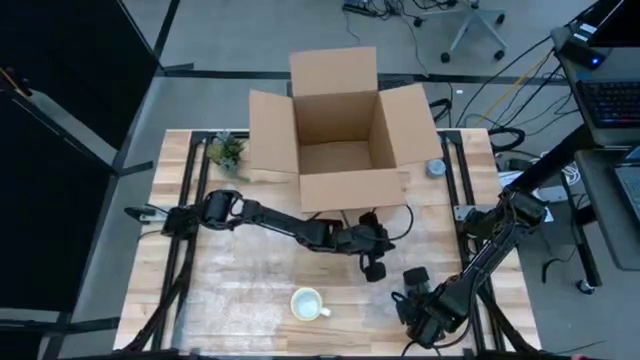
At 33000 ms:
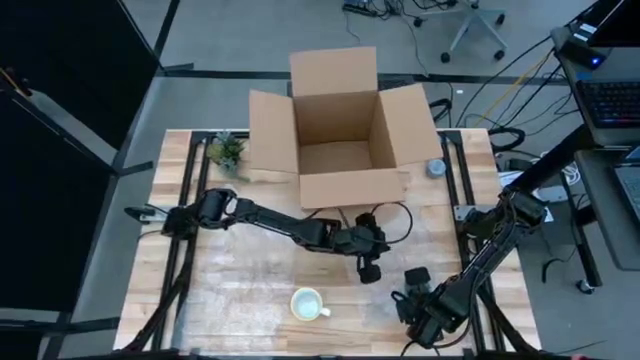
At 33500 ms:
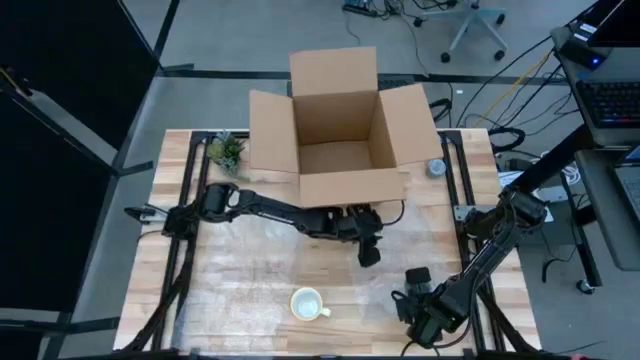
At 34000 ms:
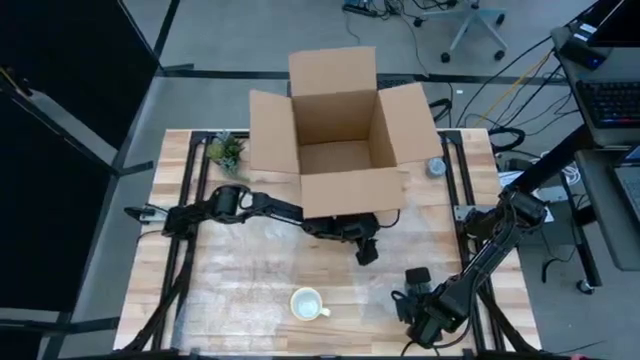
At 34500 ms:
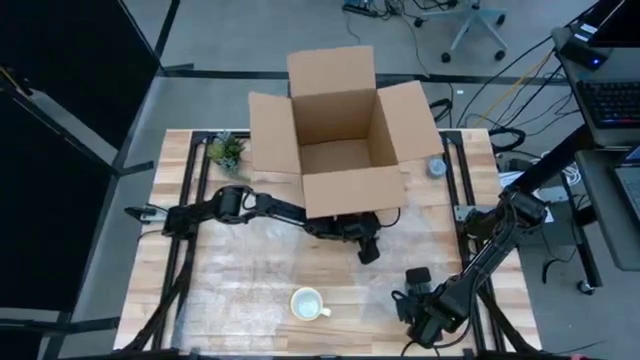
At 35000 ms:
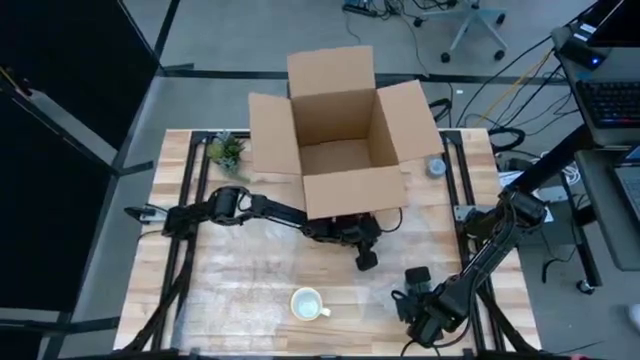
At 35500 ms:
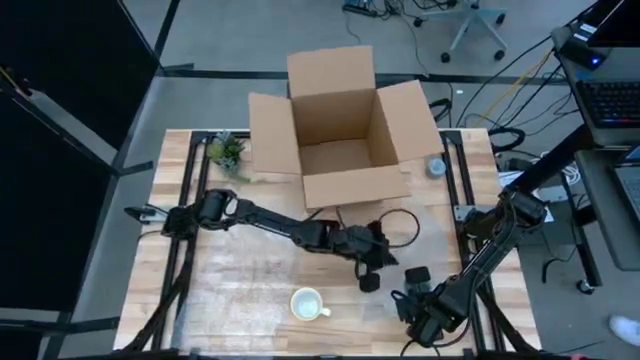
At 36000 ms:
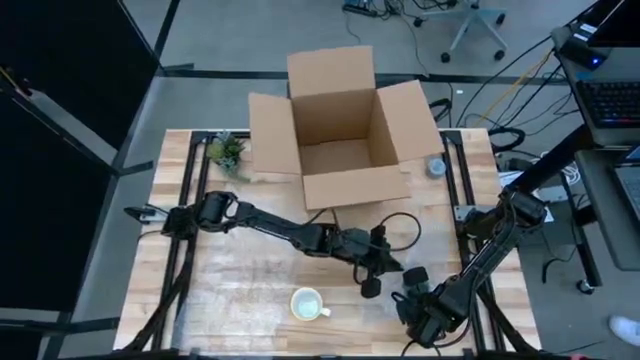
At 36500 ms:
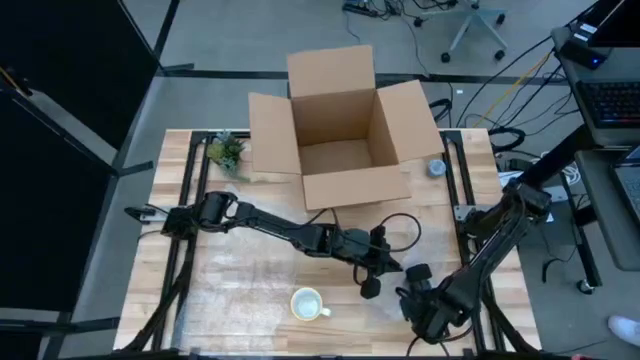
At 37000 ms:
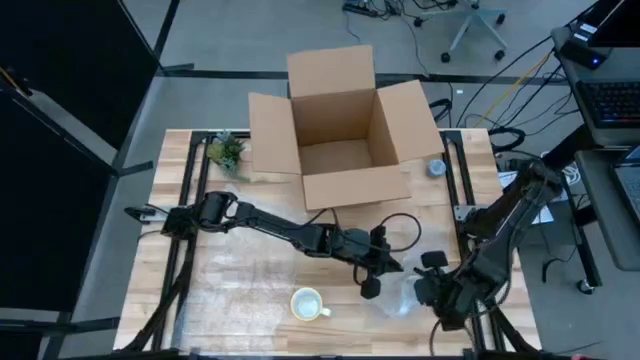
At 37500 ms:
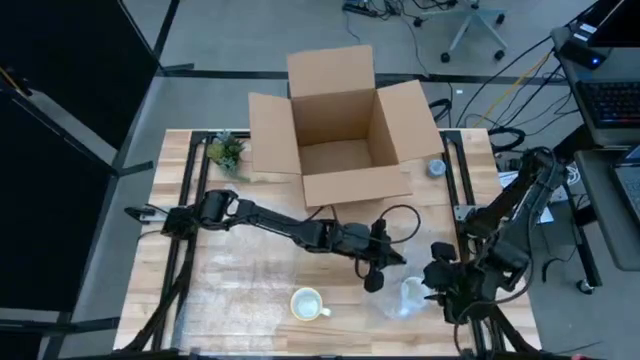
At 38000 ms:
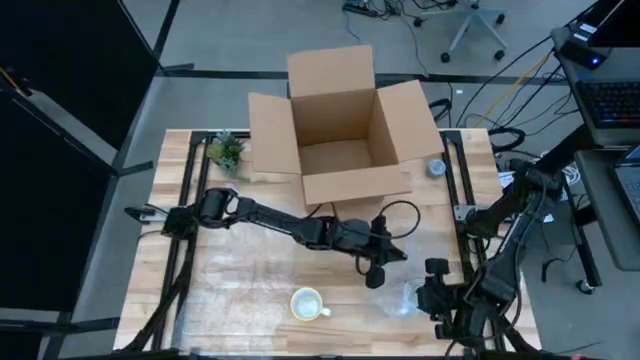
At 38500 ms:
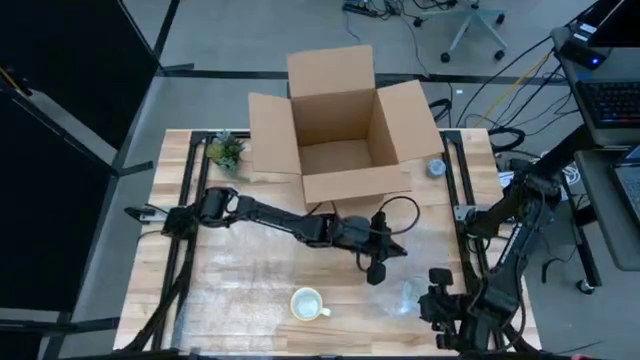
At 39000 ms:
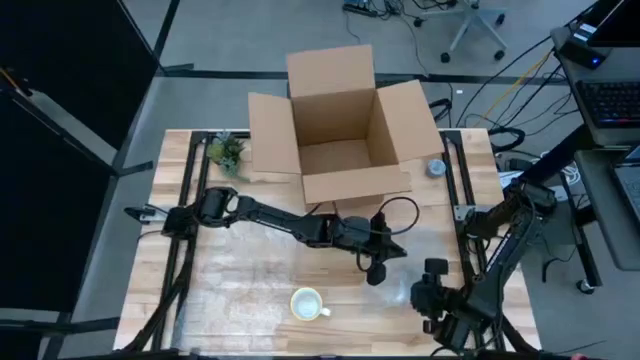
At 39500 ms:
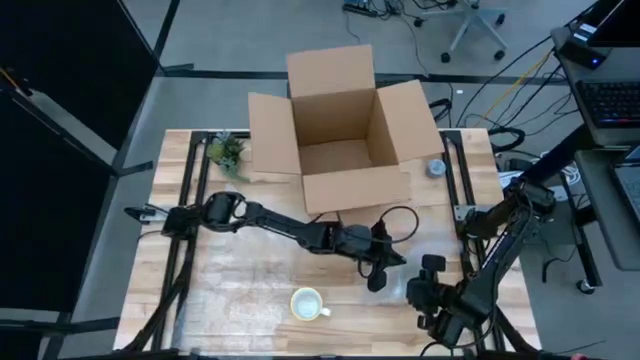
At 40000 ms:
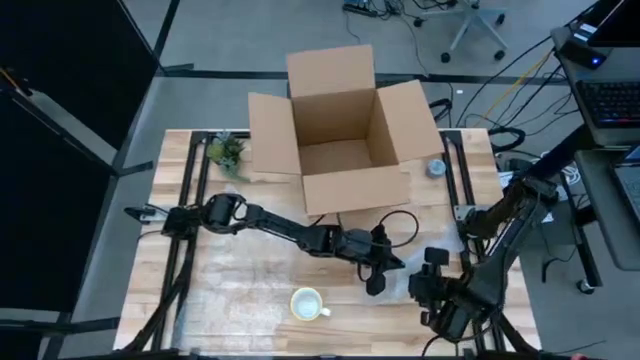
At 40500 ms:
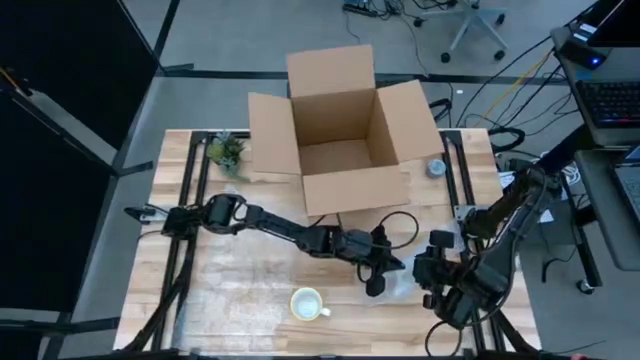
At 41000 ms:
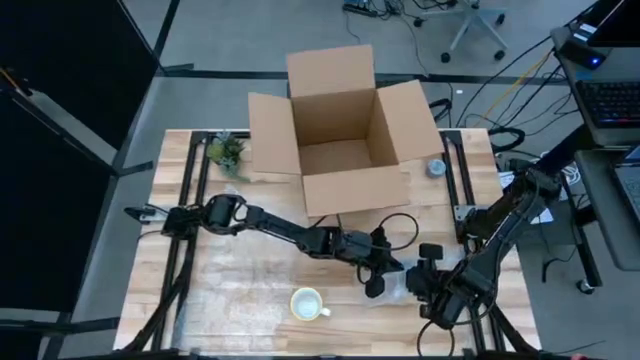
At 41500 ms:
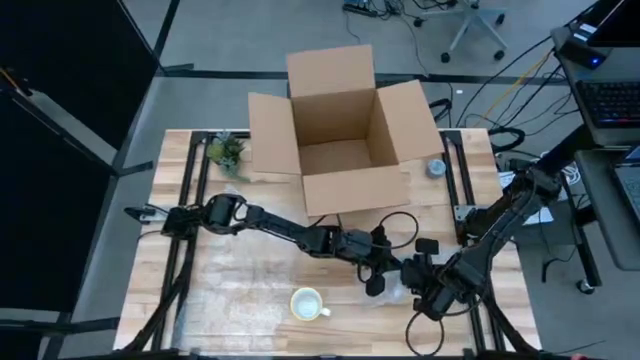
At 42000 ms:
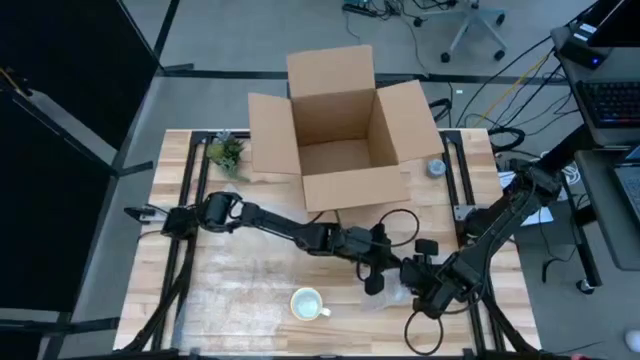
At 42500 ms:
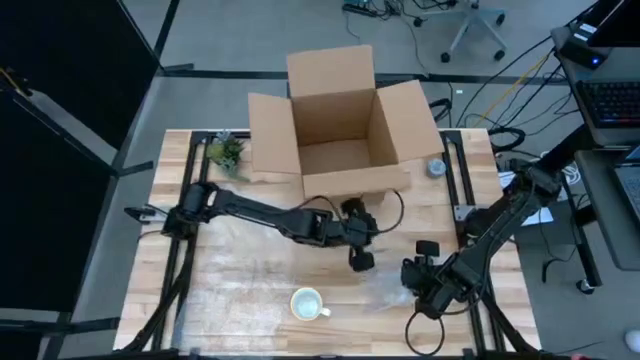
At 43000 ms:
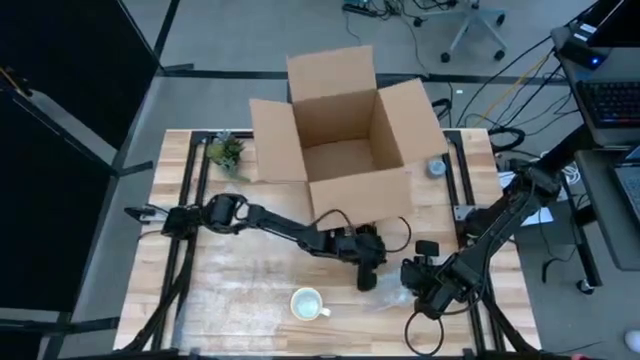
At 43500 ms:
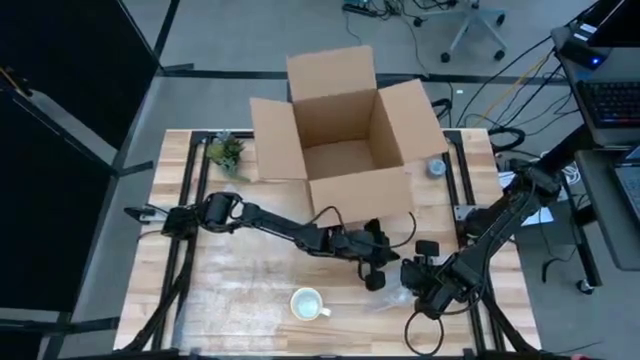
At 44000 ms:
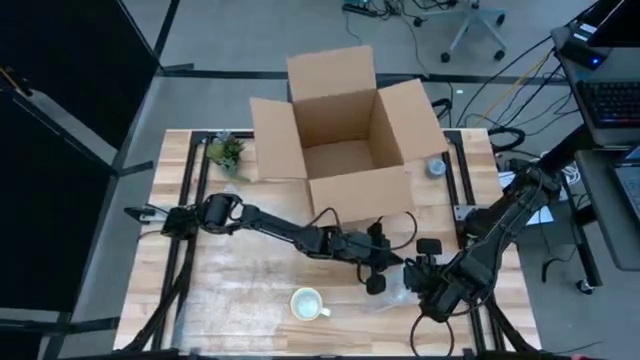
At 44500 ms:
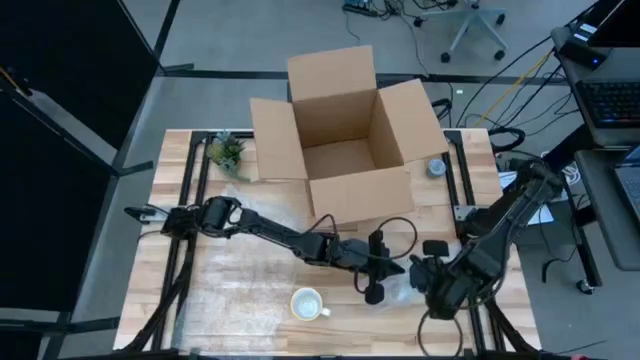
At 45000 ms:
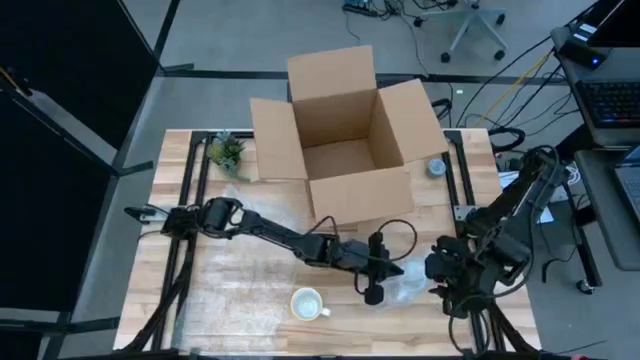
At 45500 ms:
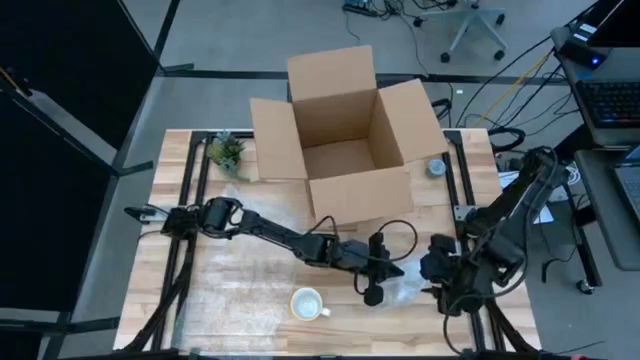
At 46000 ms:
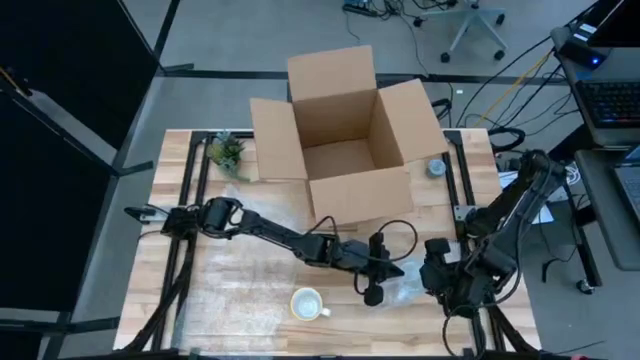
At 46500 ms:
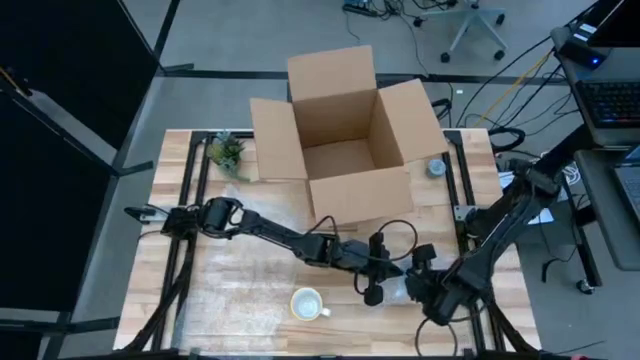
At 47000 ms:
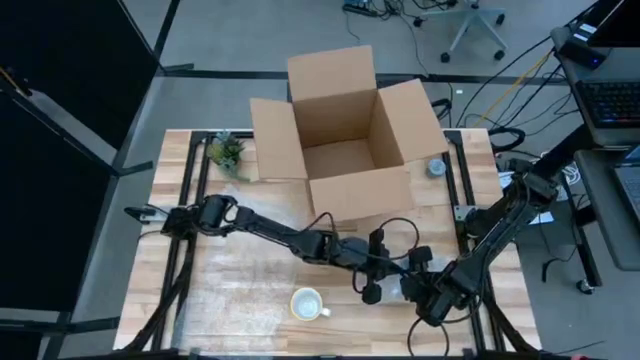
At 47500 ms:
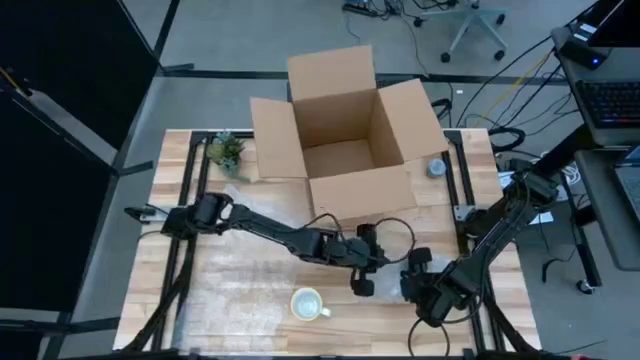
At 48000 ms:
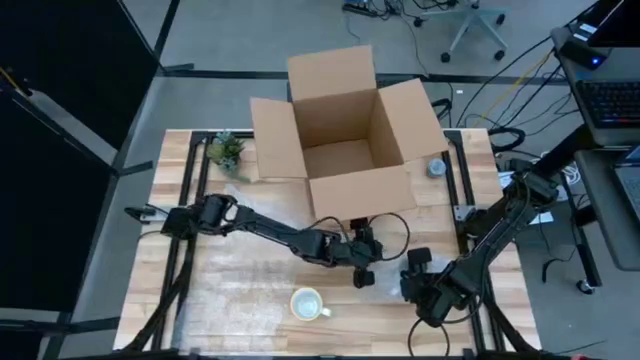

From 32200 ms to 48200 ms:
Task: wrap mug
Wrap the red mug with bubble wrap

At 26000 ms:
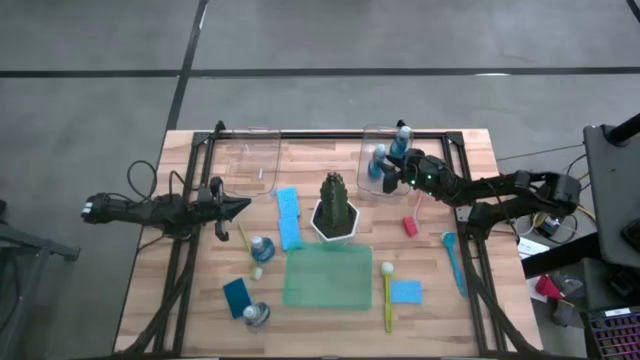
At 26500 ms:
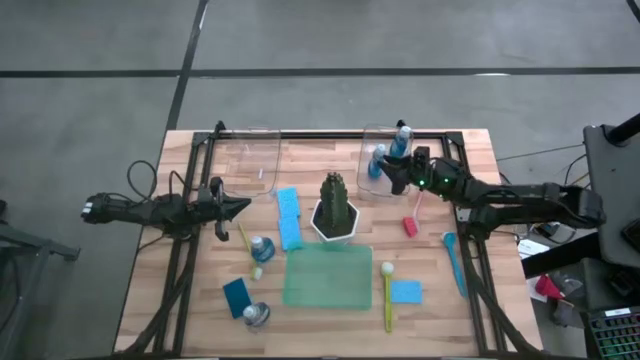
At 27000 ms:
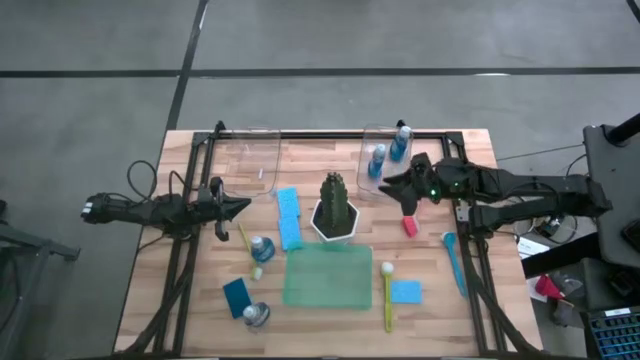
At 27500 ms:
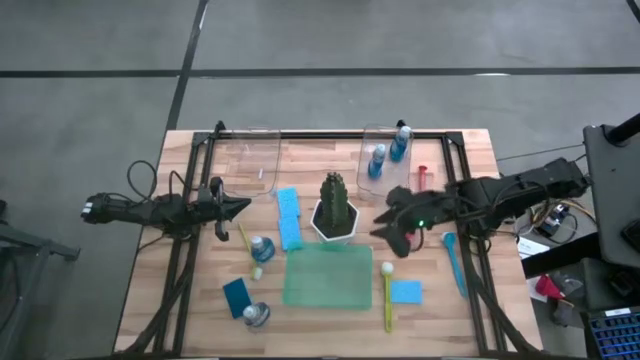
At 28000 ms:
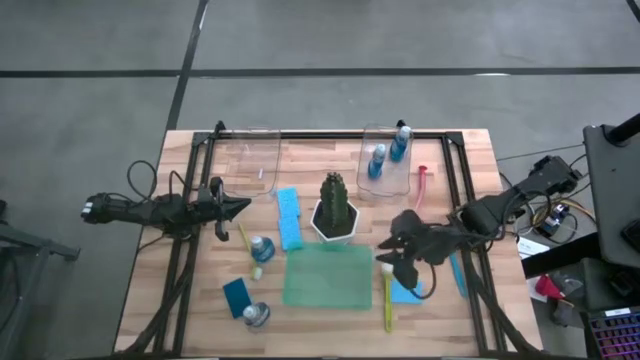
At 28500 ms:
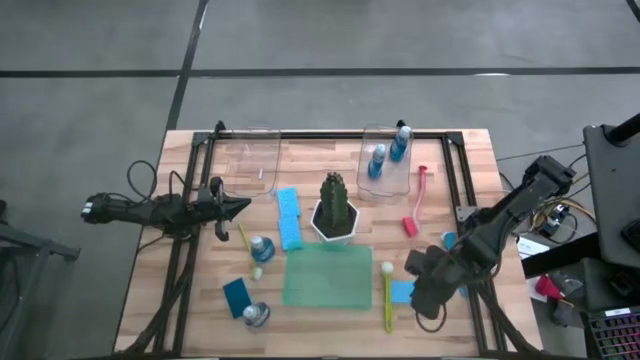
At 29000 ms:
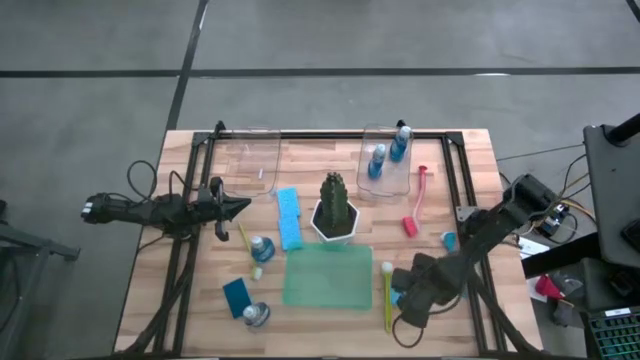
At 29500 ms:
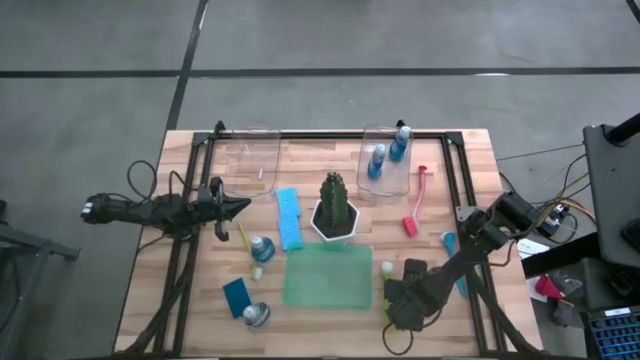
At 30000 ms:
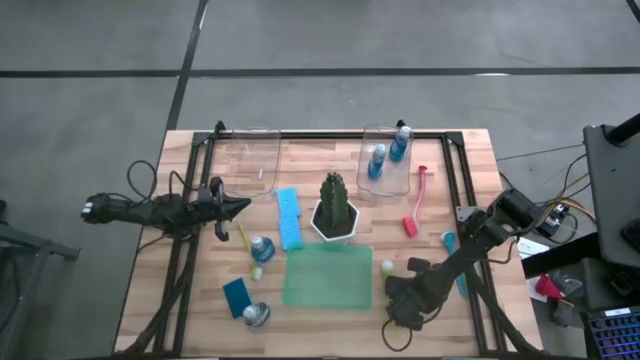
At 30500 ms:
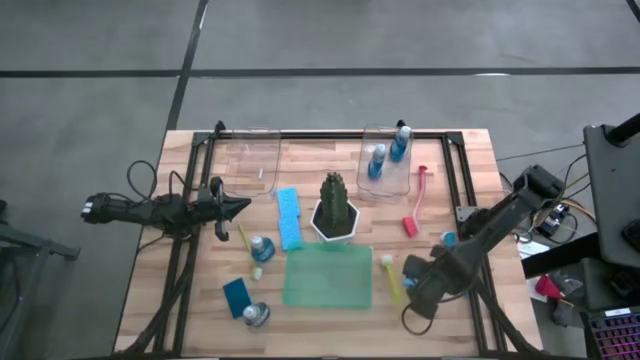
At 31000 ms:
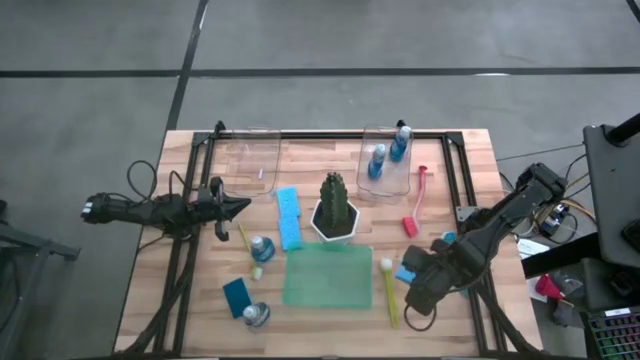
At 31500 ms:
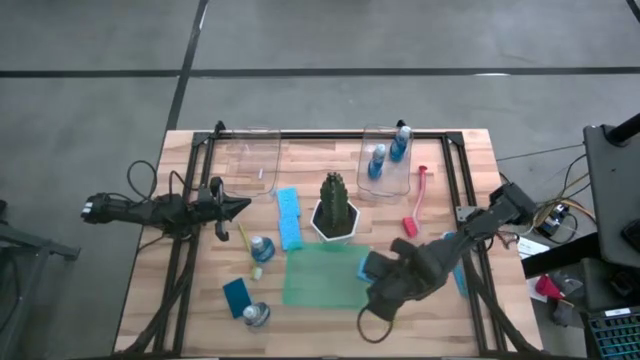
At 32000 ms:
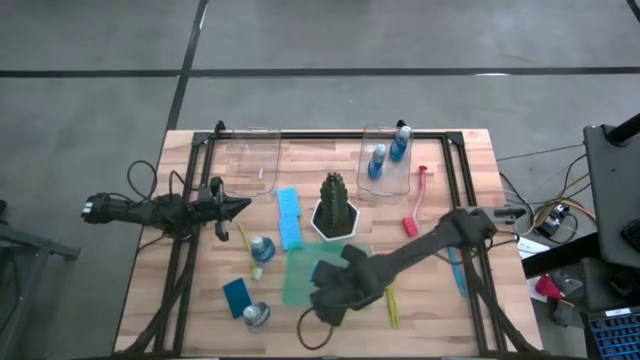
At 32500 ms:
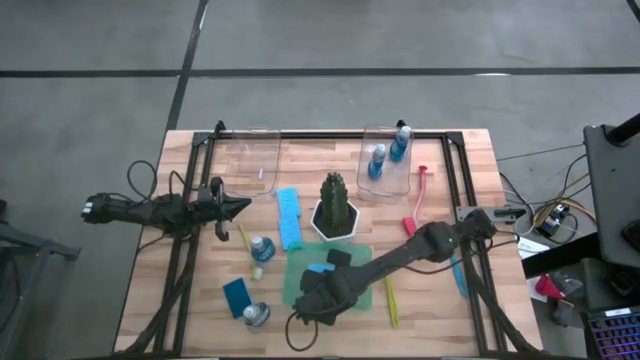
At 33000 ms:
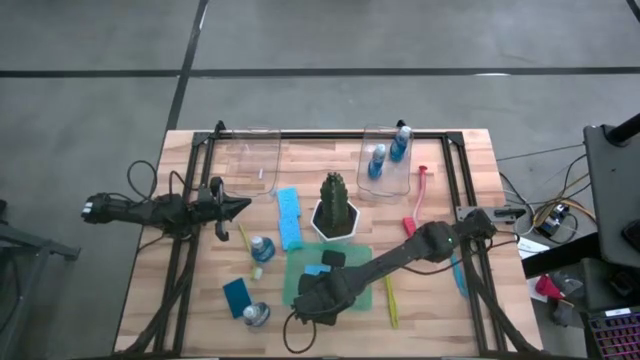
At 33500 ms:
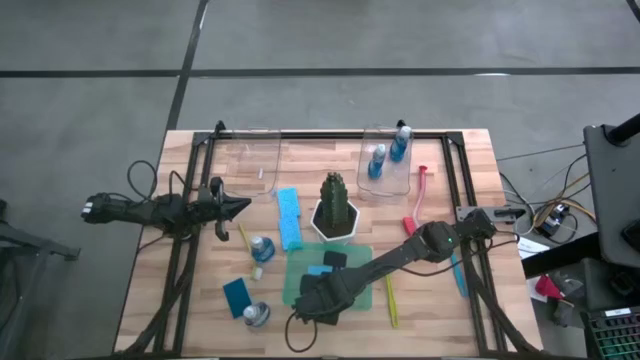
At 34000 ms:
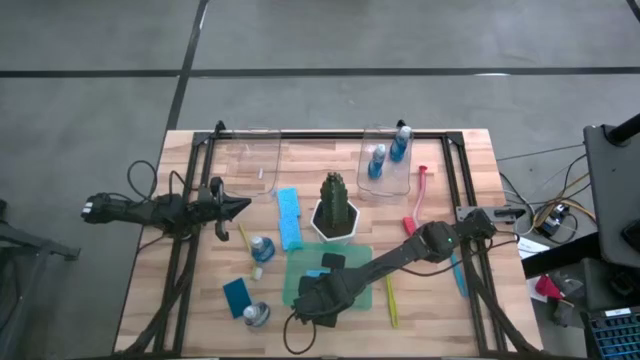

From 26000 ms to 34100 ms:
Task: Pick & Place Kitchen Sink Supplies
Put the sponge into the green bin
